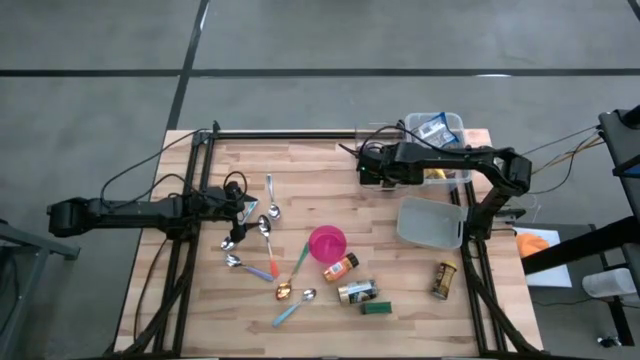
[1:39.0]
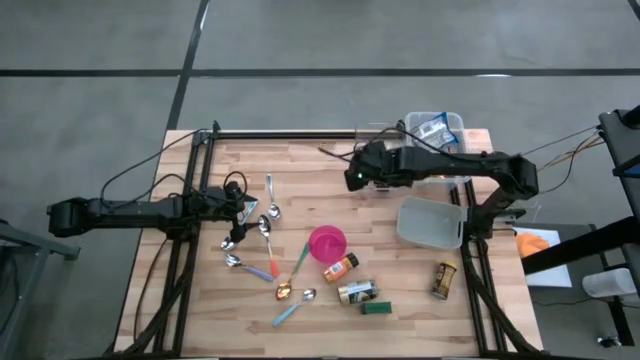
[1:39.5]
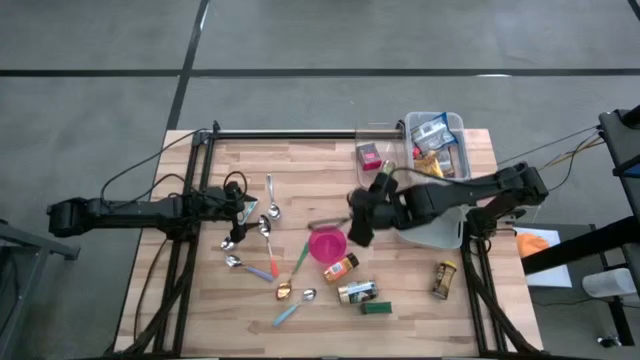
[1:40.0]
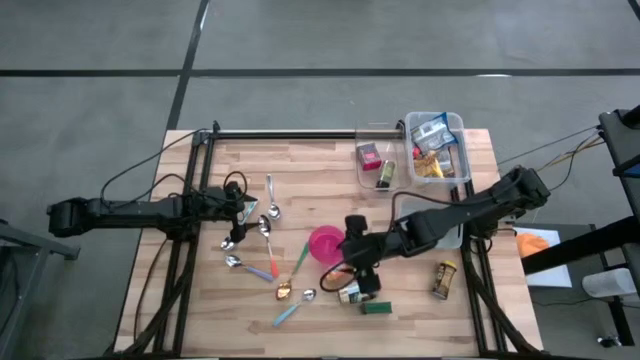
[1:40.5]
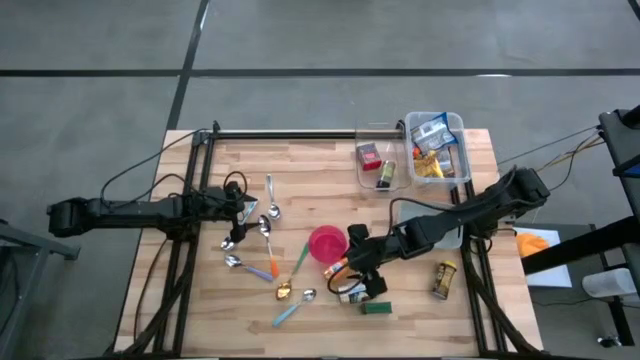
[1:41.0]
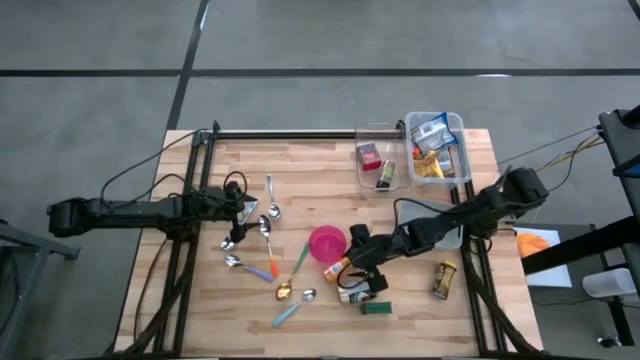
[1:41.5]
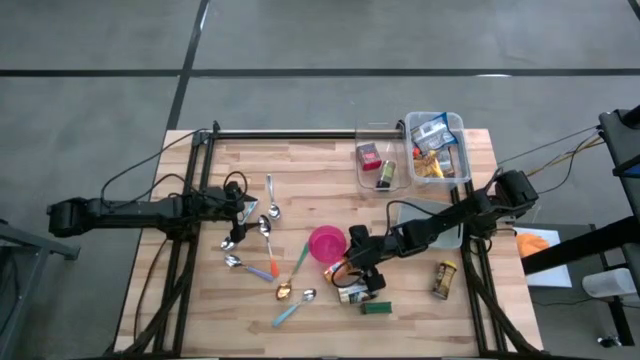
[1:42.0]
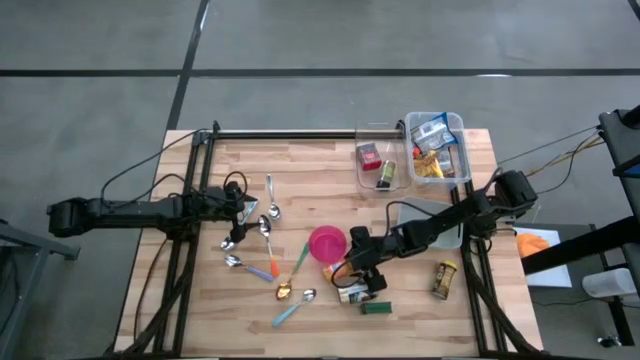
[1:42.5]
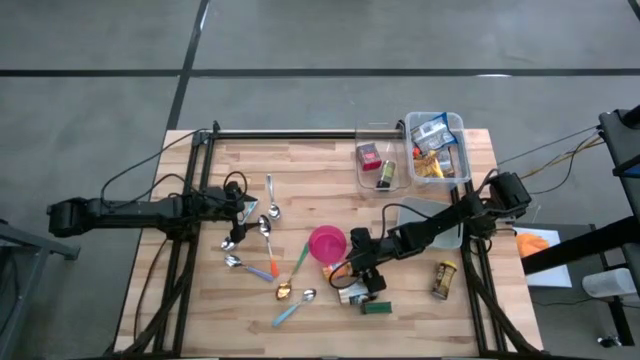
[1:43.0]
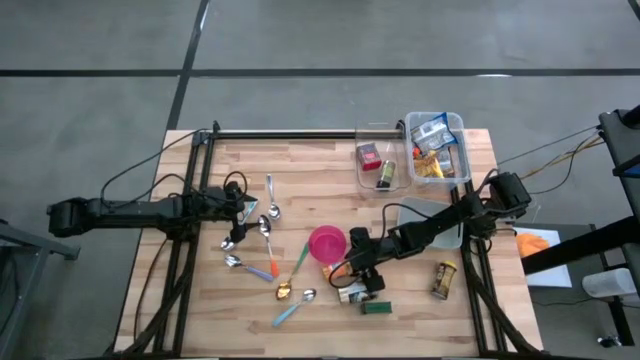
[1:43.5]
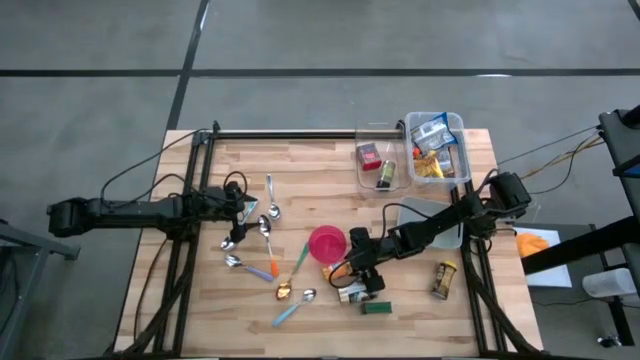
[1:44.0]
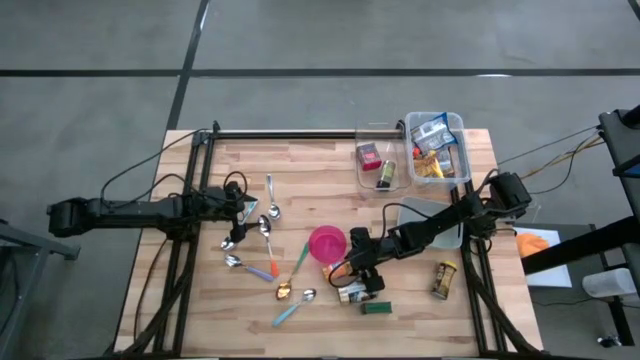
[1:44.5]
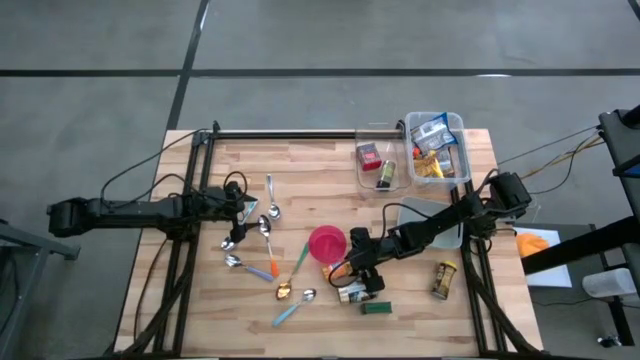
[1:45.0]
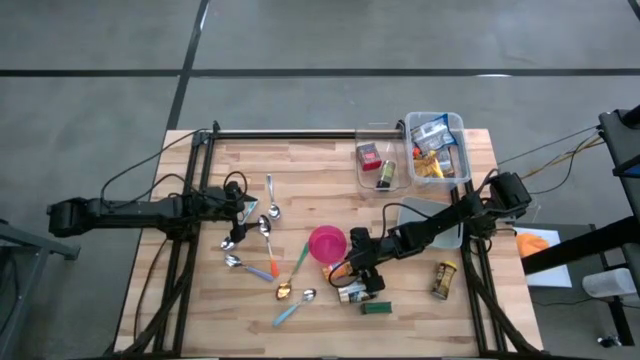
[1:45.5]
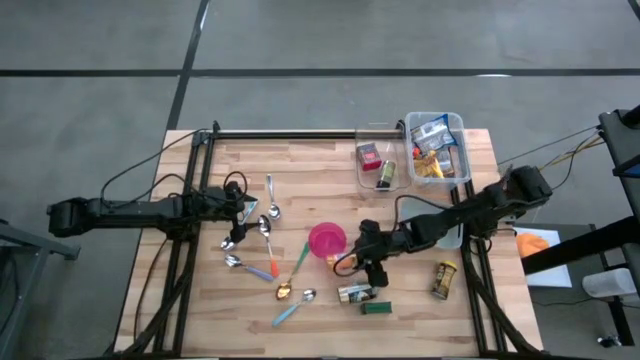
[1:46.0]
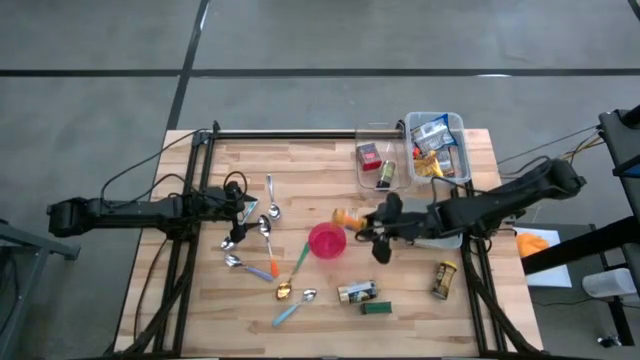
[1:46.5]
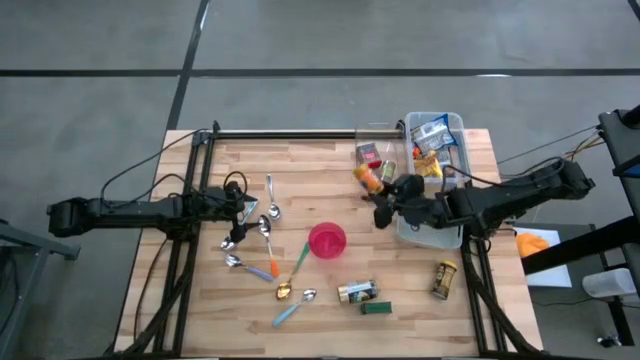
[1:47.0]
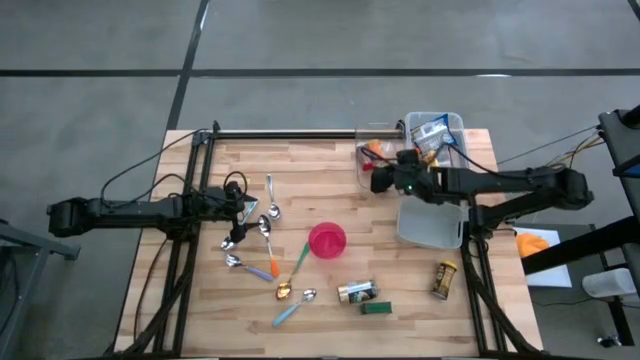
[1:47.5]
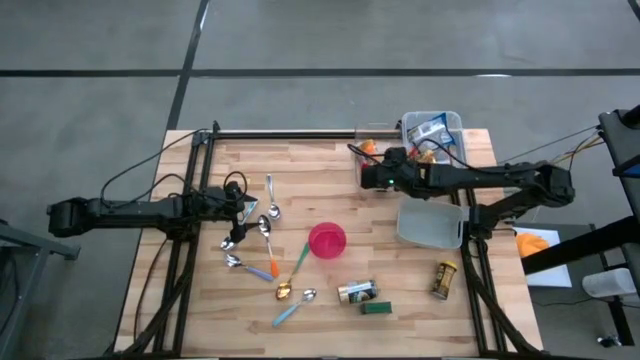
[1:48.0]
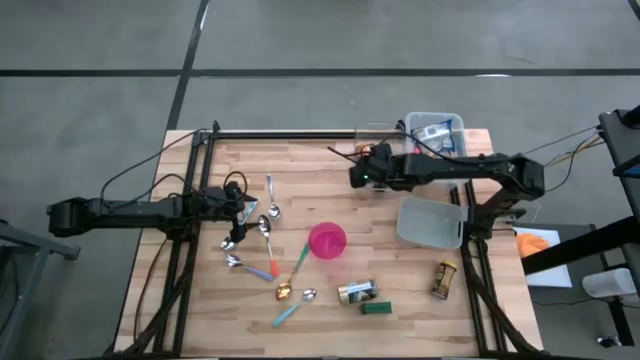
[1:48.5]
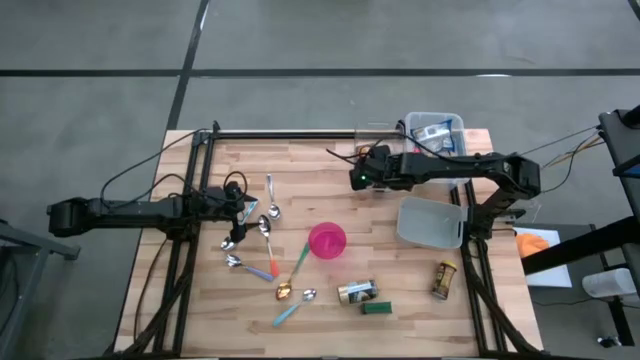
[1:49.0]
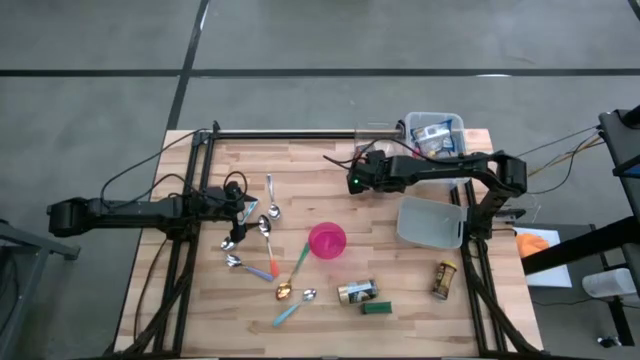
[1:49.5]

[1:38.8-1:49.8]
Put the orange seasoning bottle into the transparent bin

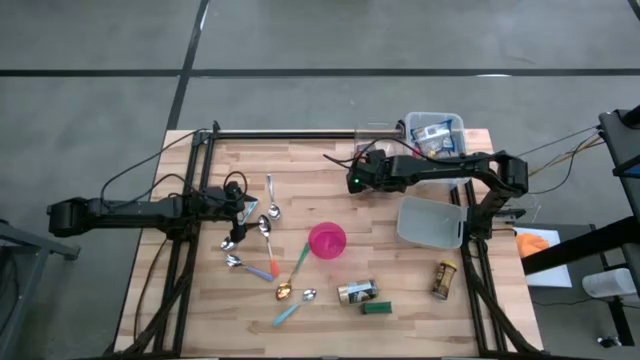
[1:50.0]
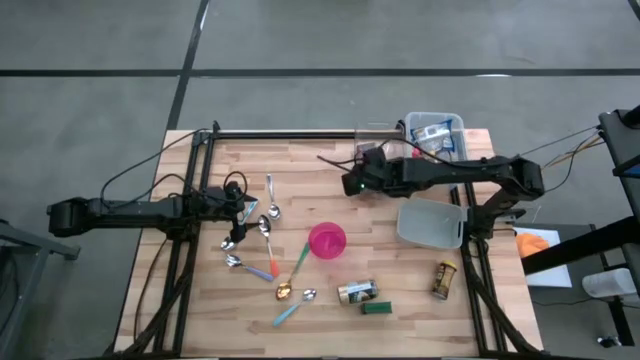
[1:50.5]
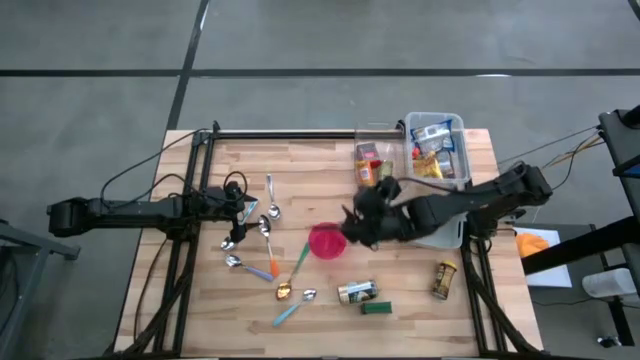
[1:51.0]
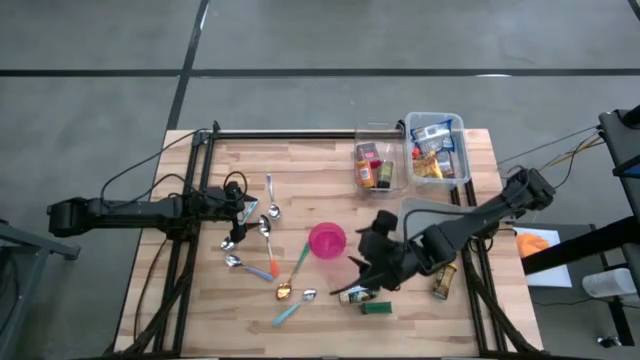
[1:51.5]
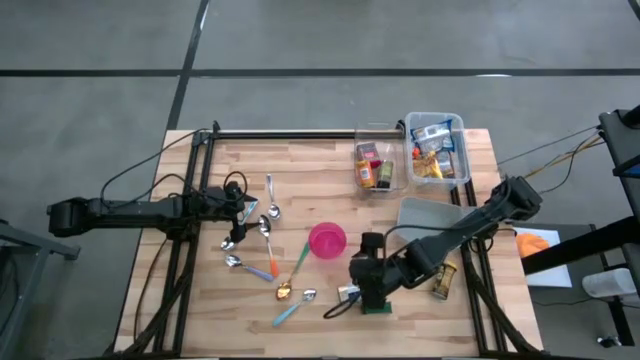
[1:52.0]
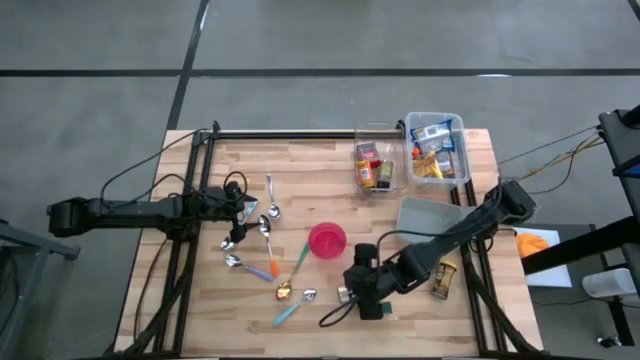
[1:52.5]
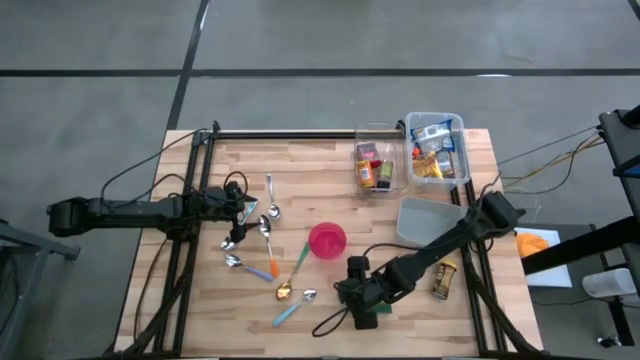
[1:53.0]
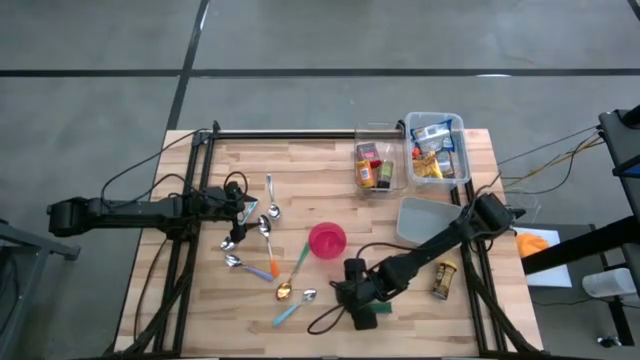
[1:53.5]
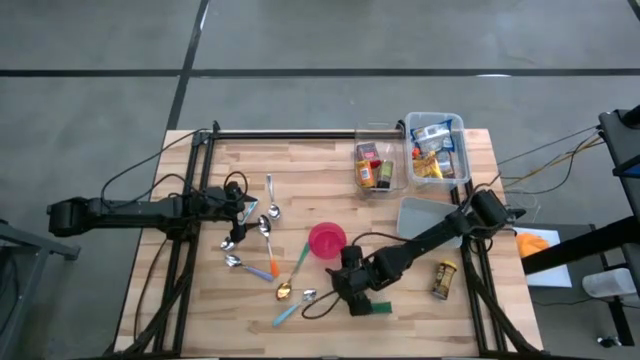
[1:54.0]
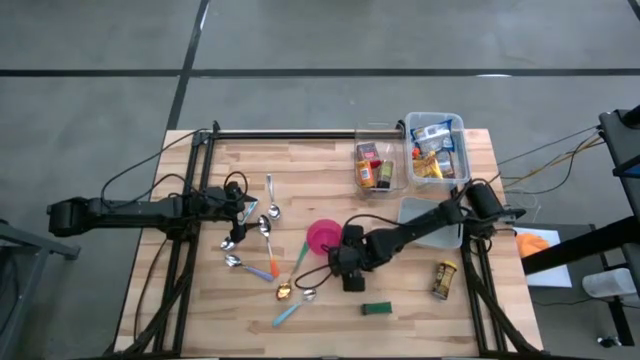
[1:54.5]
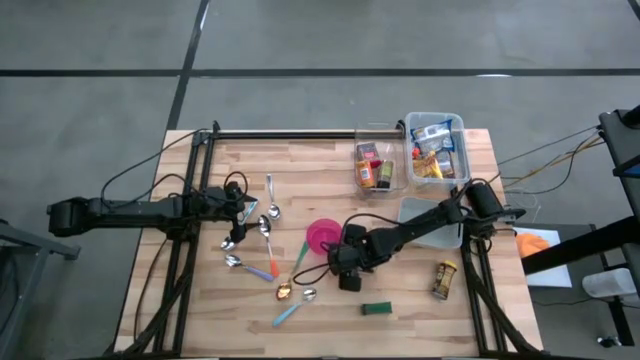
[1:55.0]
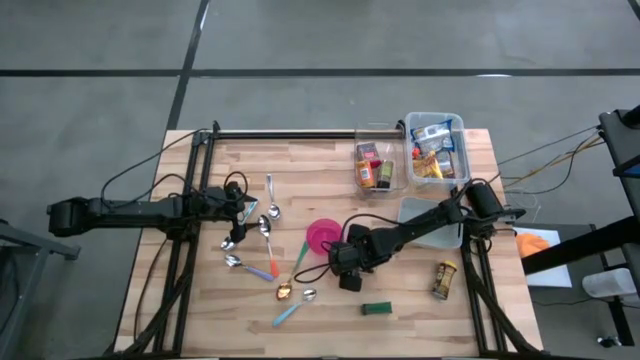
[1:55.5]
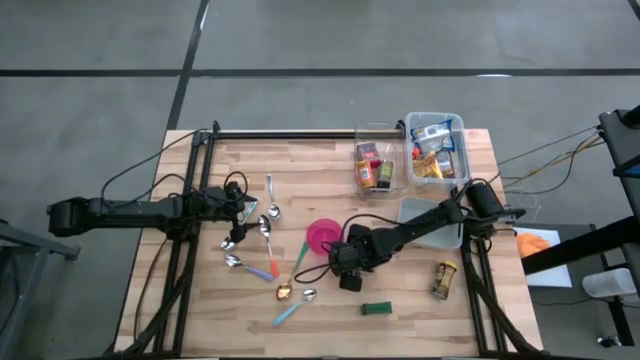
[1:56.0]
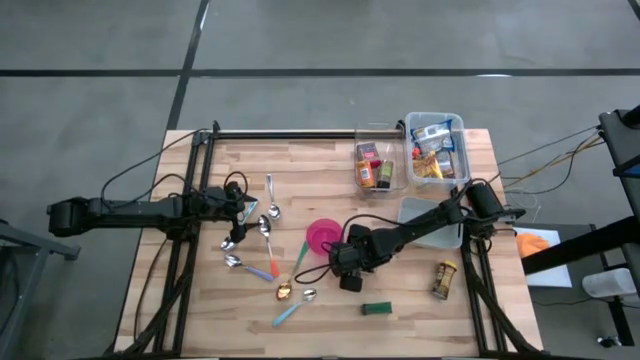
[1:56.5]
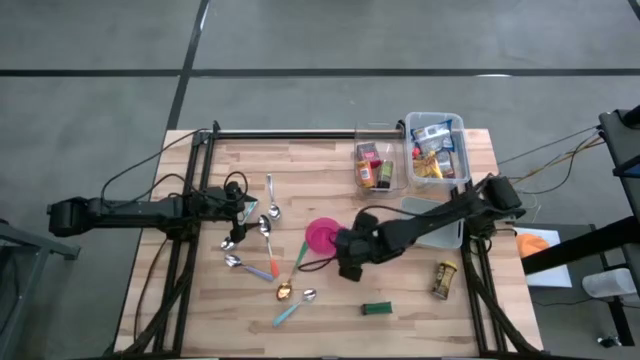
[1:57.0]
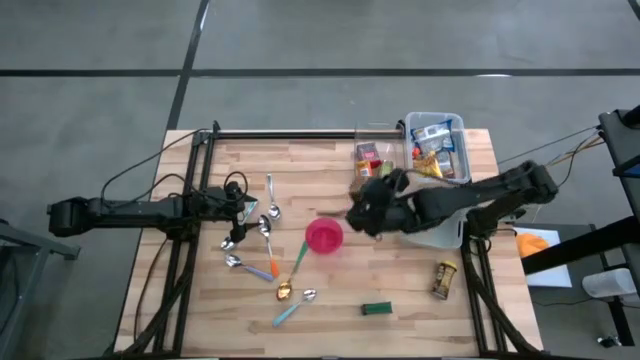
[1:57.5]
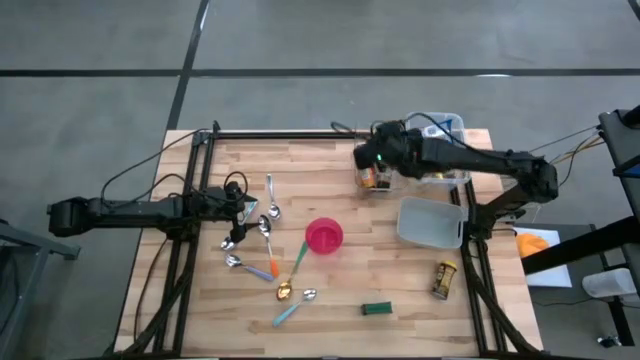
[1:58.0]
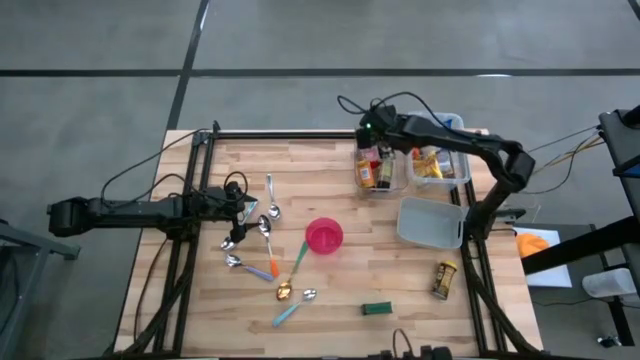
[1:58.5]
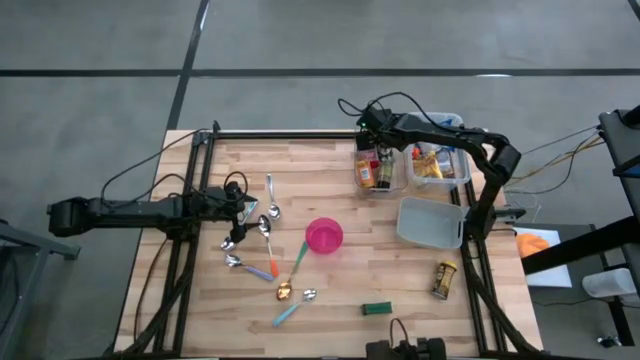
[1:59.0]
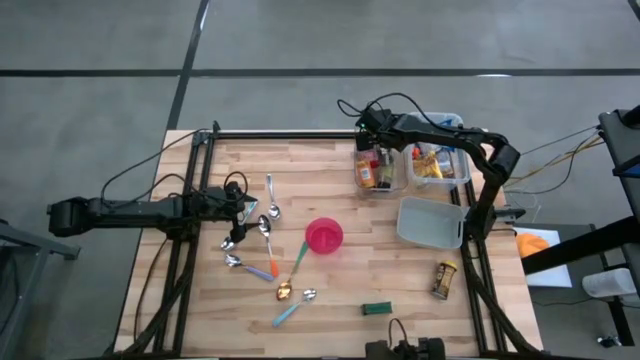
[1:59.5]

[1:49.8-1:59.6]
Put the golden seasoning bottle into the transparent bin
